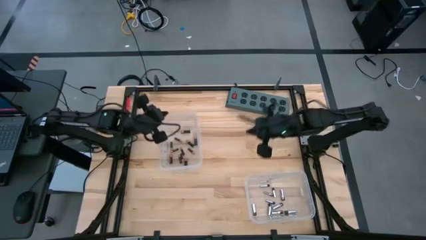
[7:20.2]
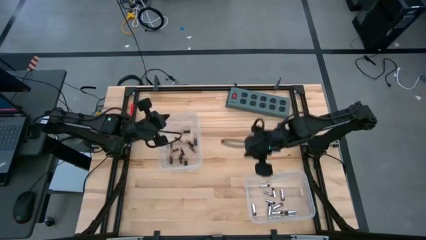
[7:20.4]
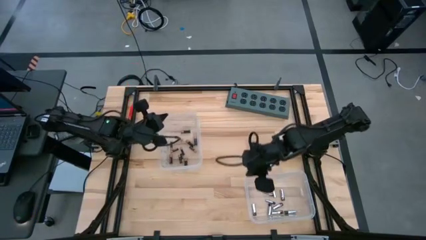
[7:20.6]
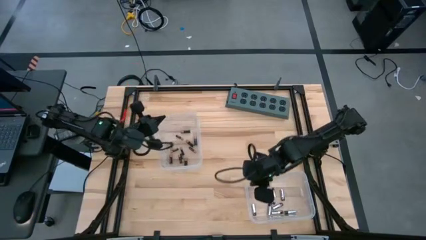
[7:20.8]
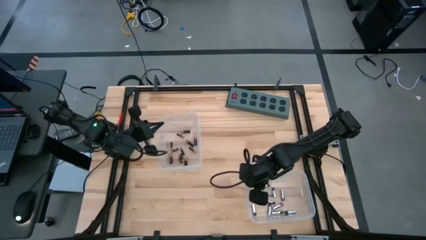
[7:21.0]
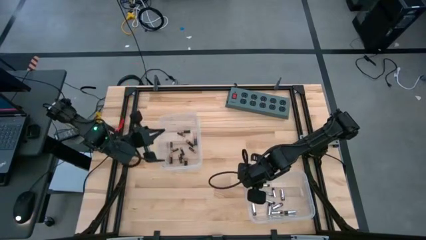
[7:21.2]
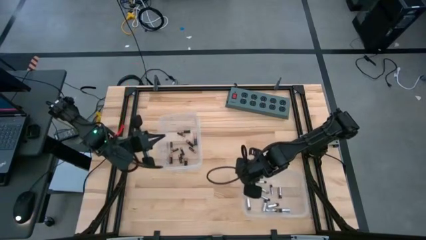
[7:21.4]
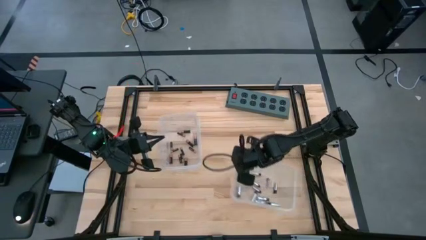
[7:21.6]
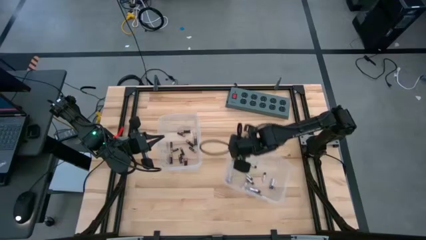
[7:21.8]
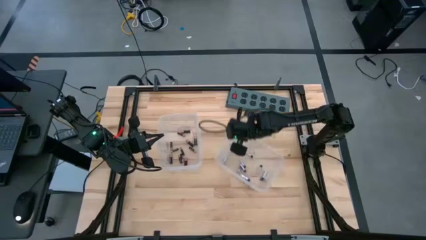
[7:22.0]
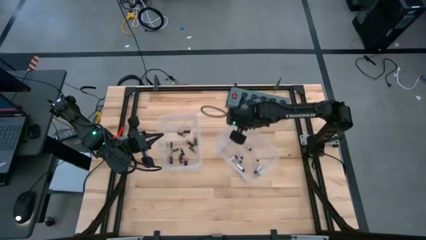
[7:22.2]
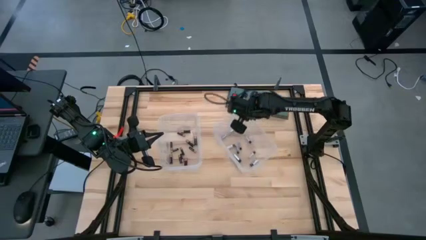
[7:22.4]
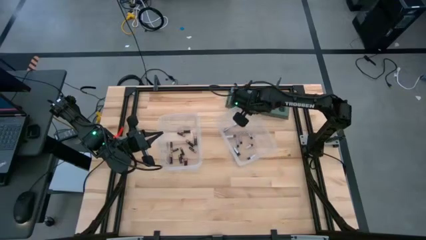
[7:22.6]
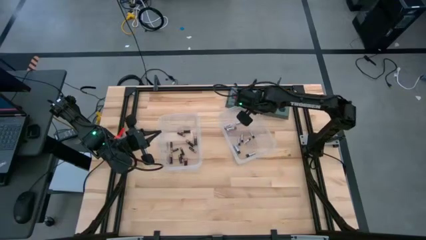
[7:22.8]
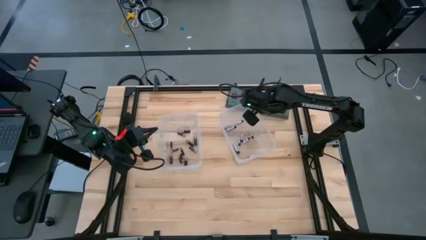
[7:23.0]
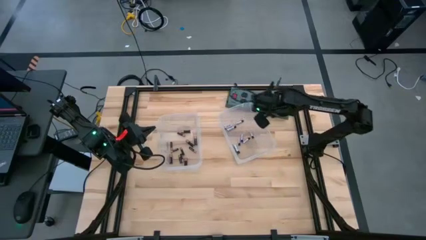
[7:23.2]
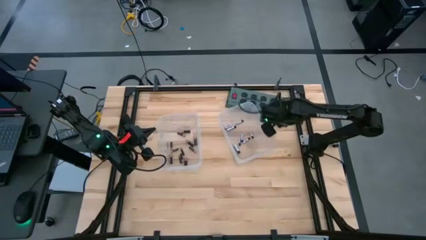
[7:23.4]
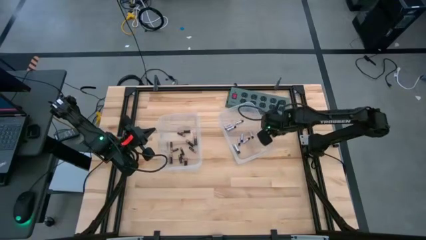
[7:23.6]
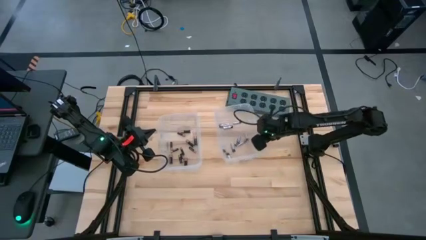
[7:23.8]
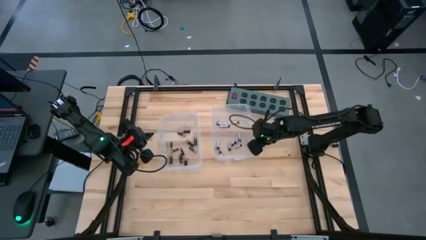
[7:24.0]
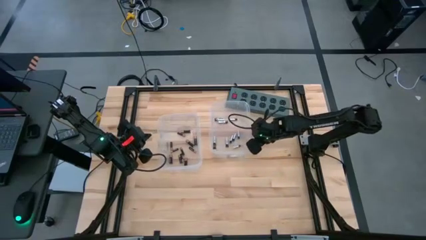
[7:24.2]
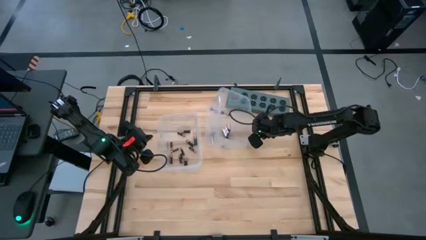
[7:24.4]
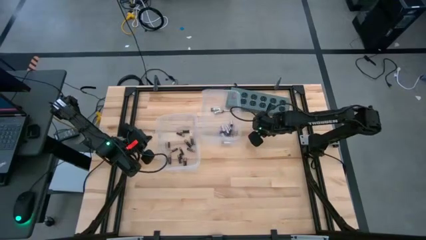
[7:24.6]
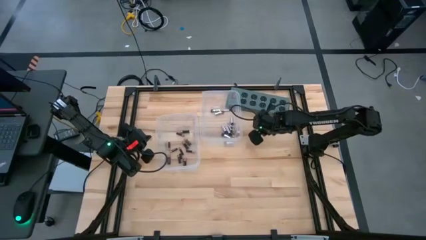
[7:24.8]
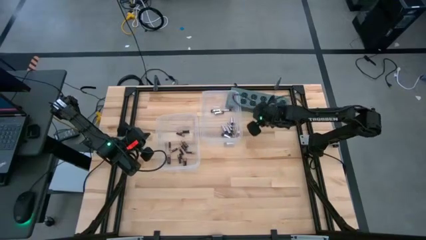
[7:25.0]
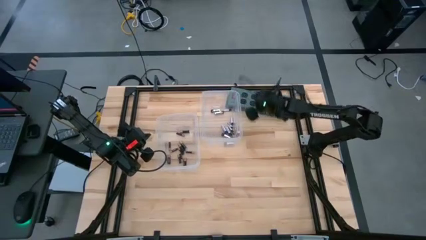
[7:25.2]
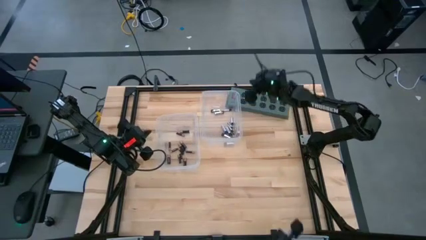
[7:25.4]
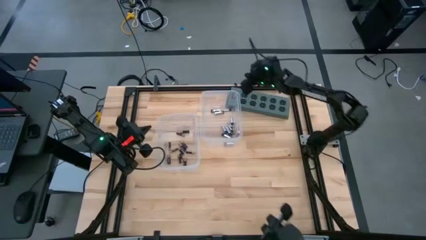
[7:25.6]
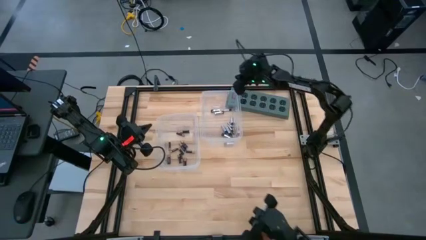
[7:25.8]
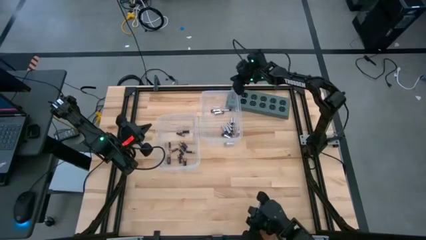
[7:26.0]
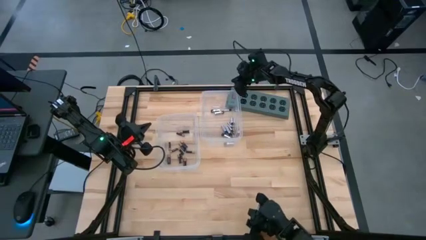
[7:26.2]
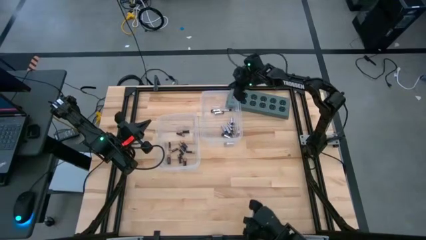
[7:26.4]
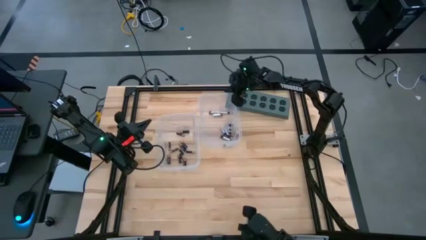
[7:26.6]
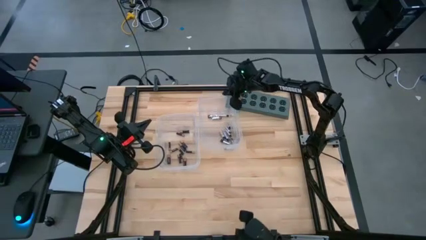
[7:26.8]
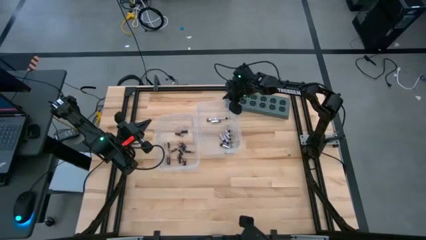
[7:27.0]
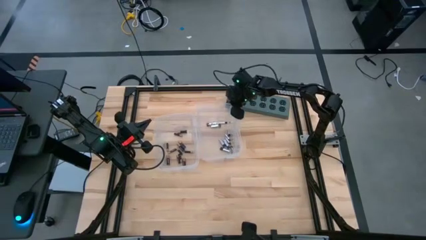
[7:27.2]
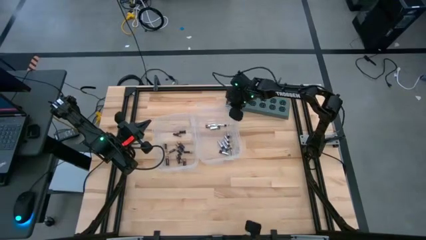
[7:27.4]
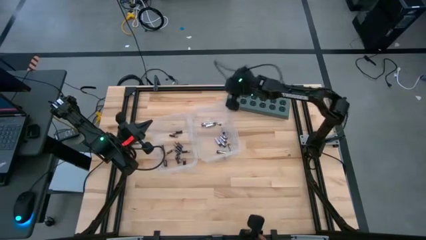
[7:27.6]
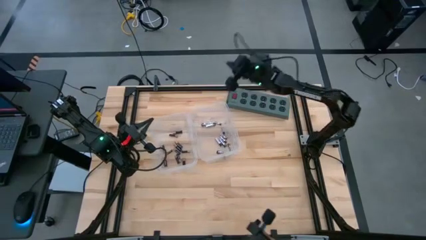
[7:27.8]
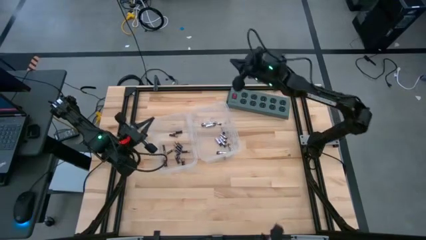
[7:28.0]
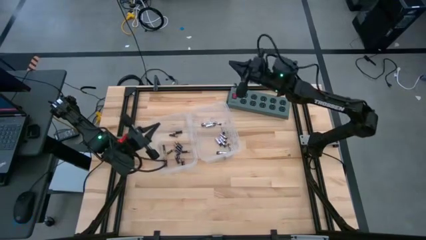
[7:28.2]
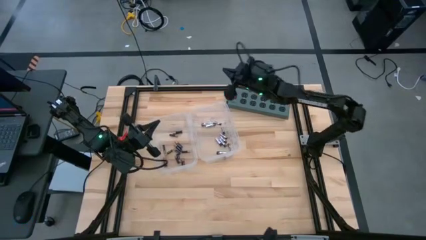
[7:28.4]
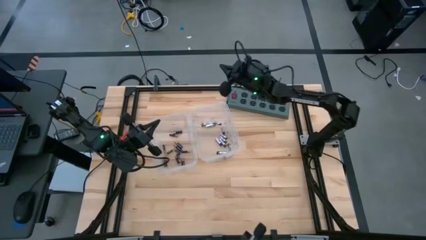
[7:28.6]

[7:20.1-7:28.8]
Task: Sort batteries
Move the bottom transparent bin to the center

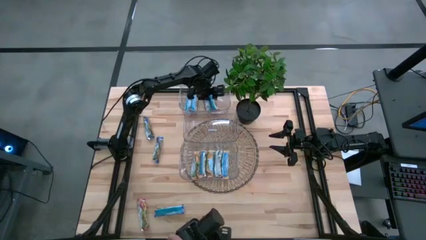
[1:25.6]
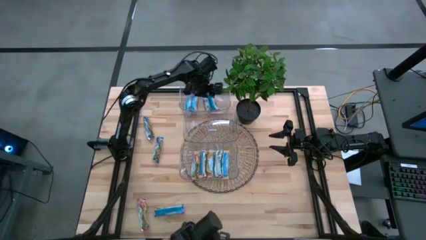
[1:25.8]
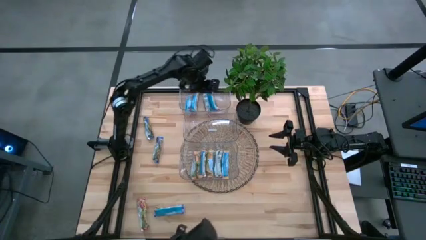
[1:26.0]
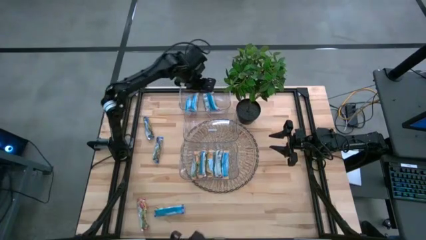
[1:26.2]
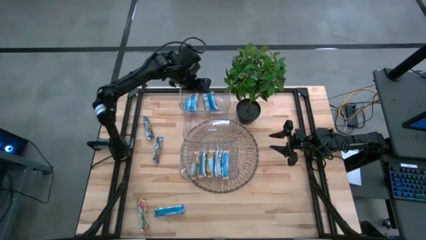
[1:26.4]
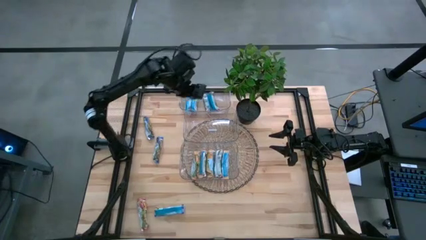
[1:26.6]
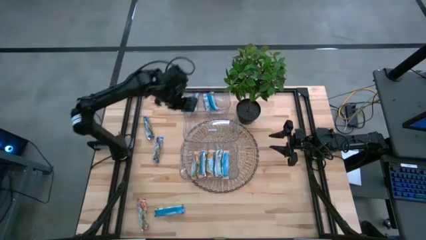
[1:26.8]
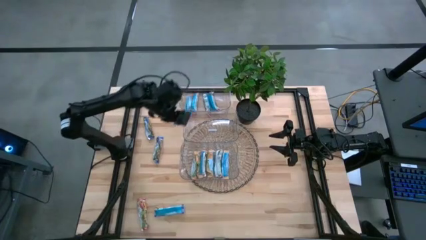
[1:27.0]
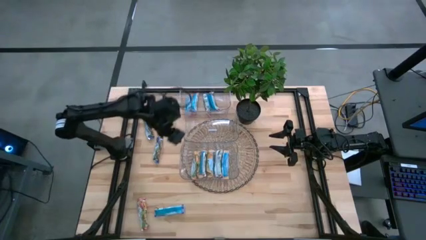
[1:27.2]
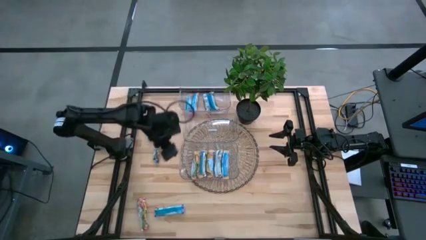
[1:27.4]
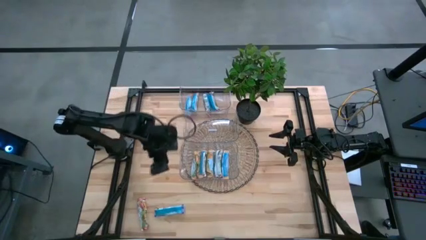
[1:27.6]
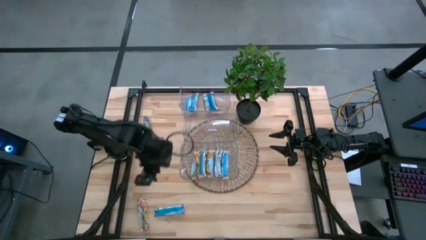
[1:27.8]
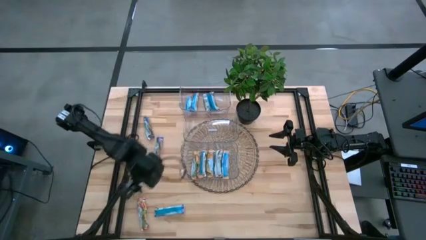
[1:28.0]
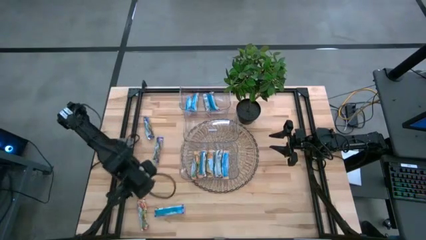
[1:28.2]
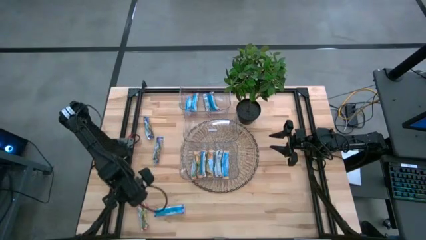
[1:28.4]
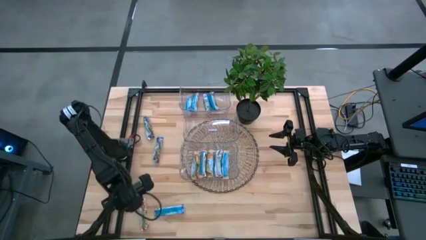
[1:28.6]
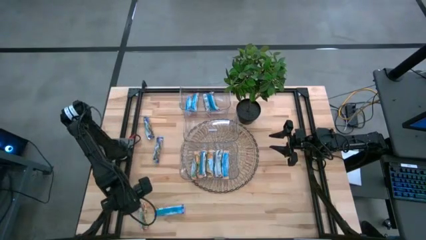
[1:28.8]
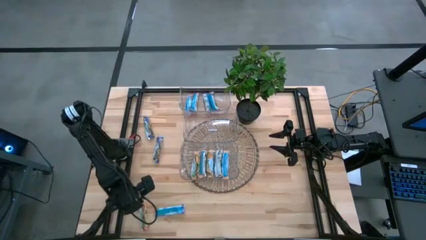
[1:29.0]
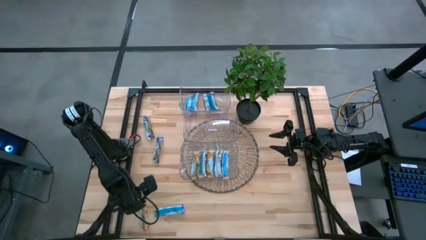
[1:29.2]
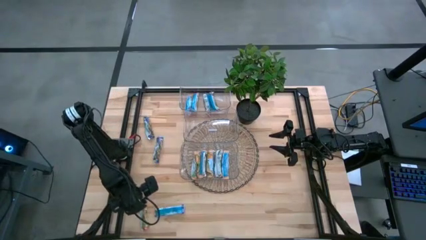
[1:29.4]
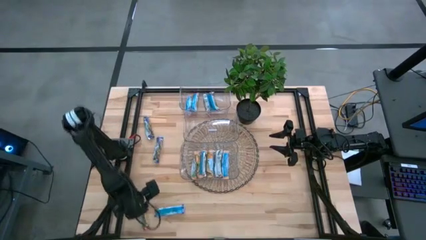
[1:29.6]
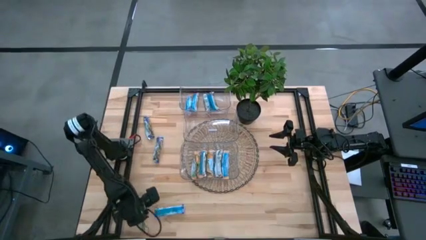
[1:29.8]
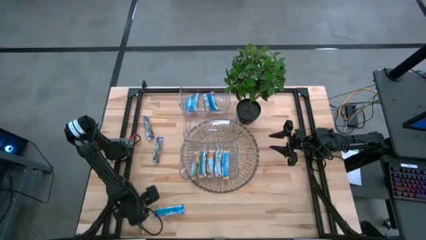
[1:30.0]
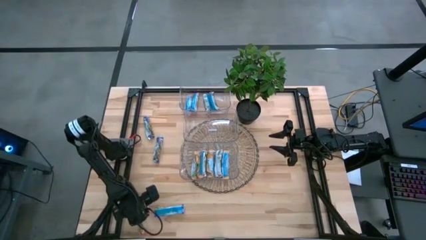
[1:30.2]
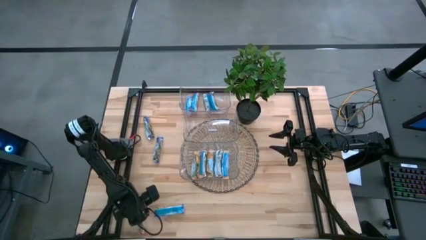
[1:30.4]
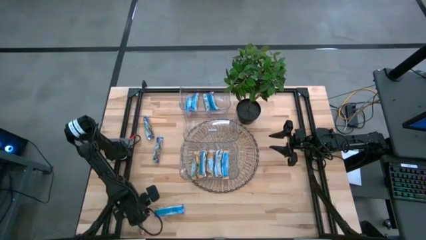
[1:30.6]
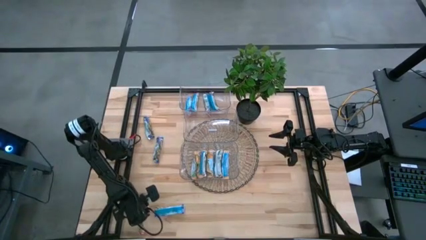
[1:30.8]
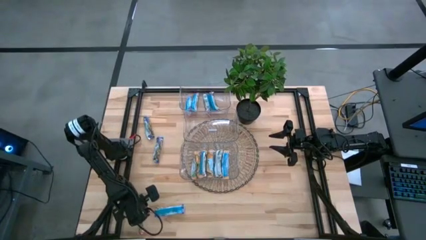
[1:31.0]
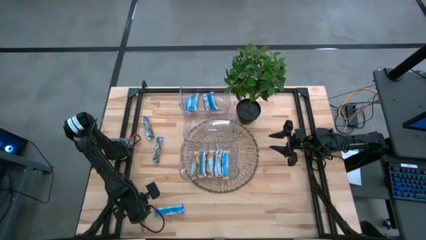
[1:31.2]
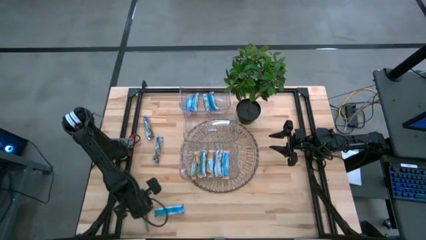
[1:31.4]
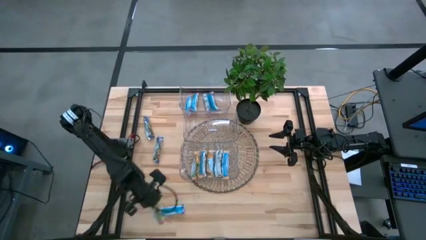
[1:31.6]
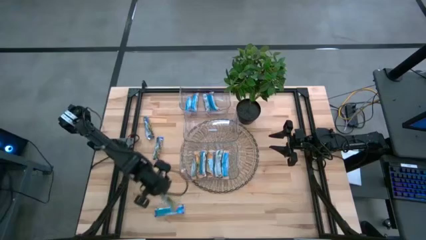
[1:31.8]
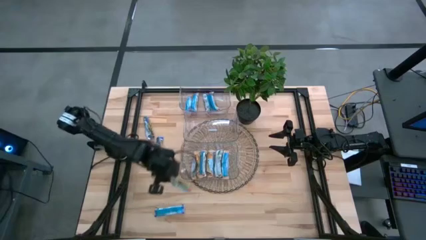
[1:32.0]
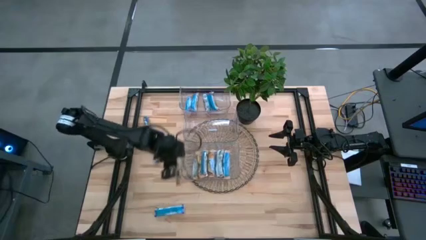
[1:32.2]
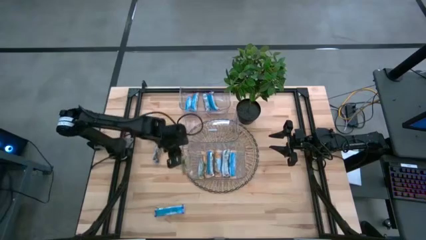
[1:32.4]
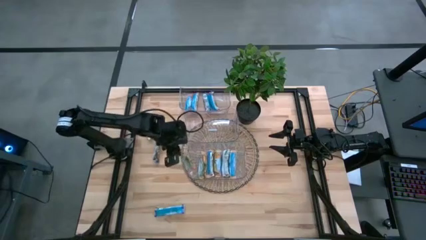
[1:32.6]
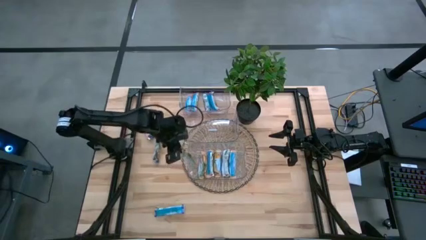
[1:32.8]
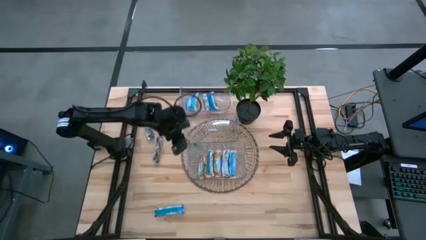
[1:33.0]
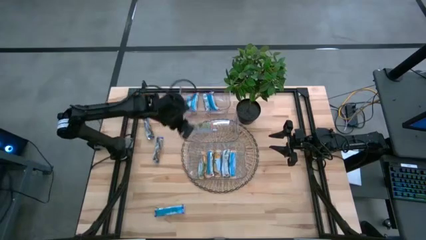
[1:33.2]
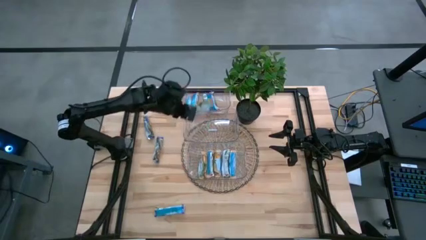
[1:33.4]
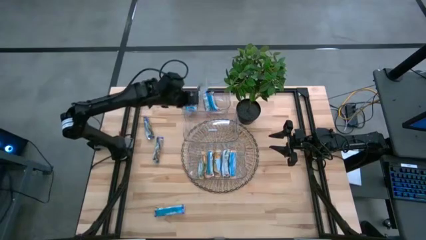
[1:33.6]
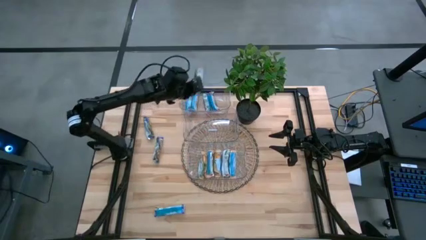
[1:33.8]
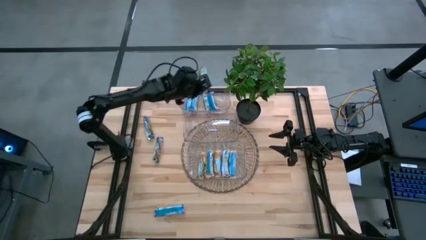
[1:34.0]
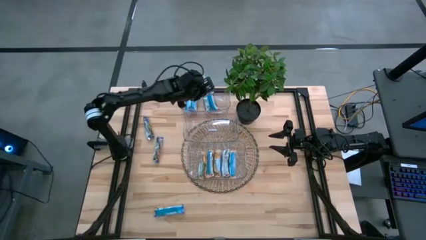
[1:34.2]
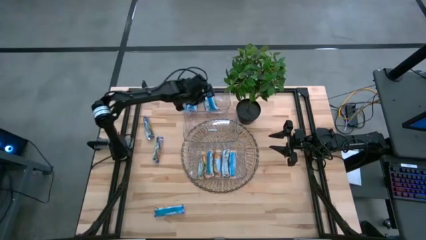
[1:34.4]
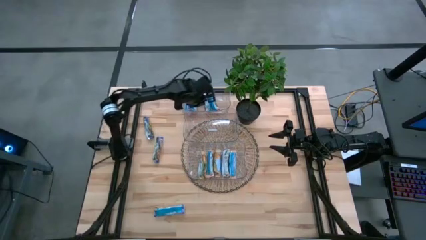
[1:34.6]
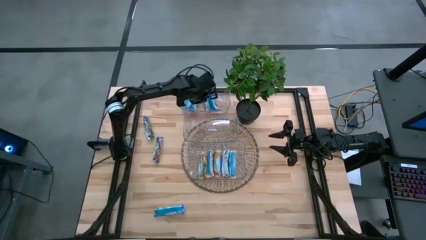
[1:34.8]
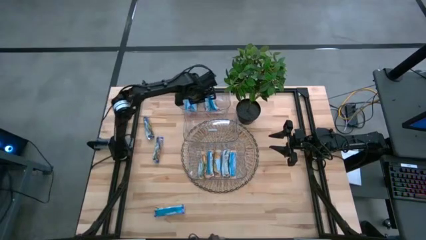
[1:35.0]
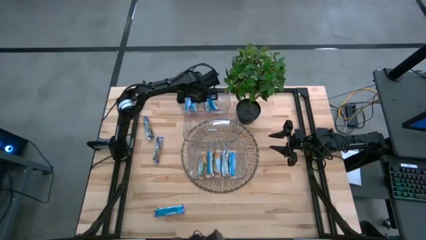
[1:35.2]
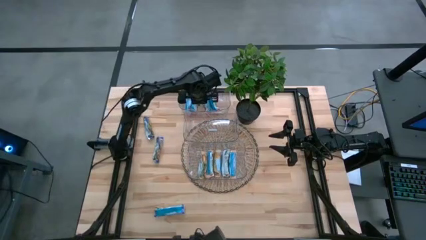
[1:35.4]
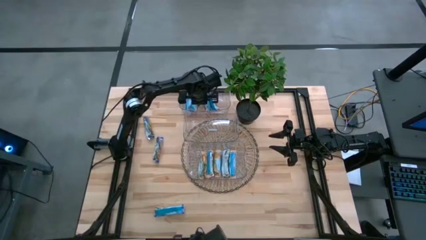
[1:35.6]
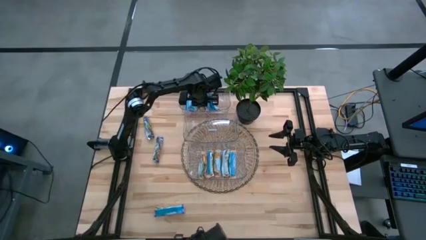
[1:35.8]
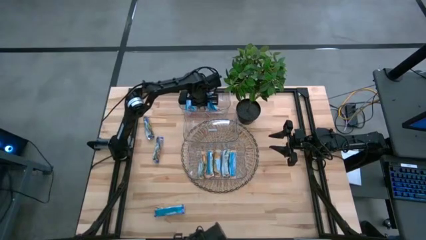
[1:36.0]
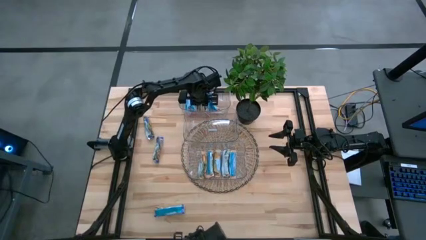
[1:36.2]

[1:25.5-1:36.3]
Task: Pick and place Granola Bars by type
Put the red granola bar into the top transparent bin
